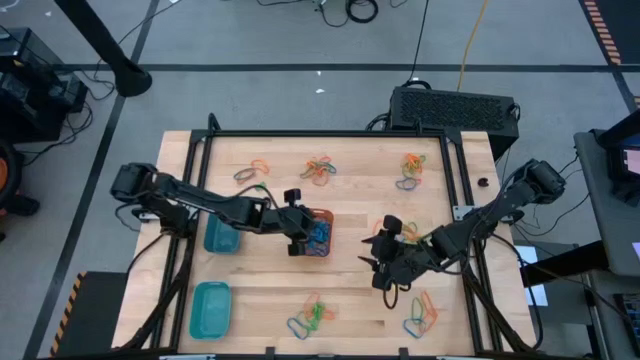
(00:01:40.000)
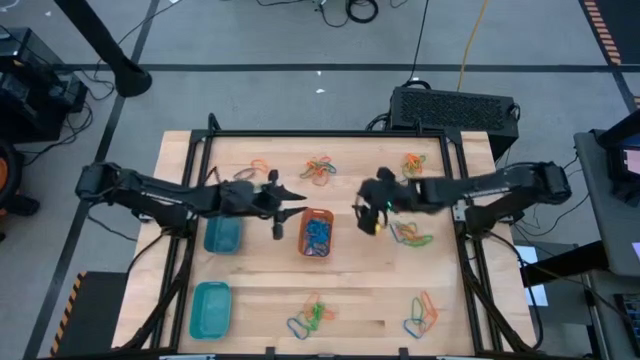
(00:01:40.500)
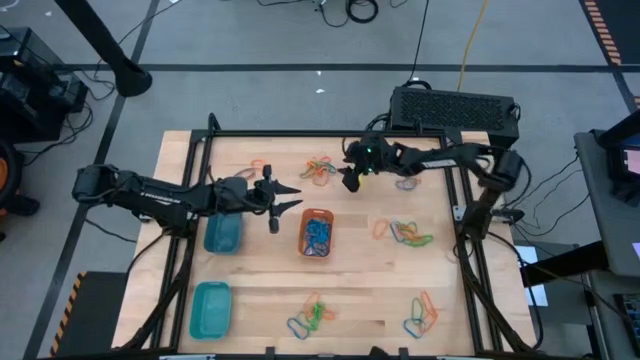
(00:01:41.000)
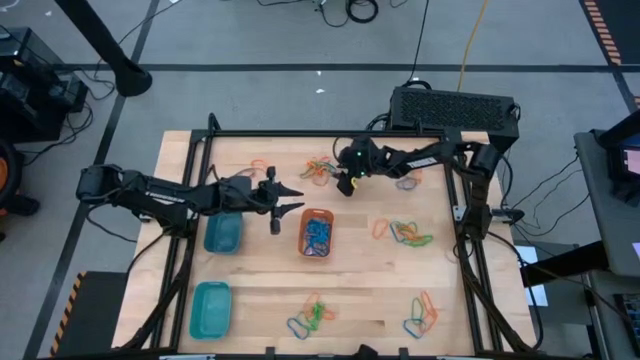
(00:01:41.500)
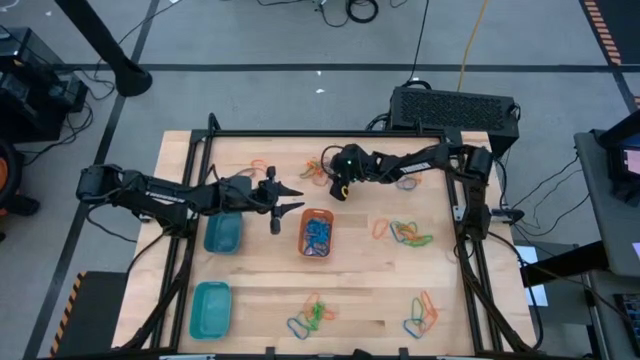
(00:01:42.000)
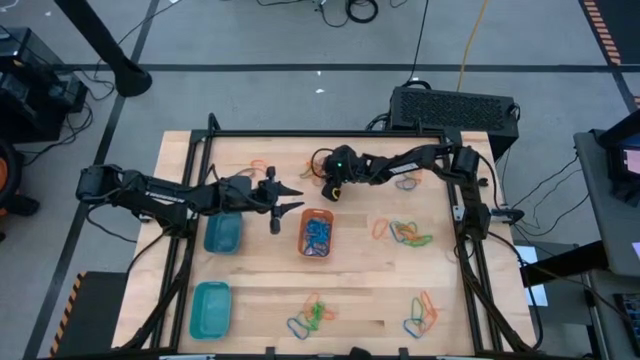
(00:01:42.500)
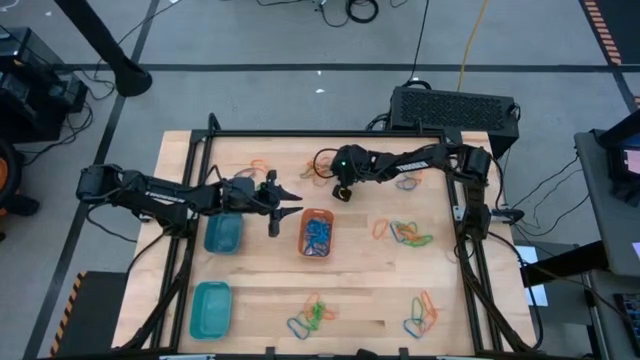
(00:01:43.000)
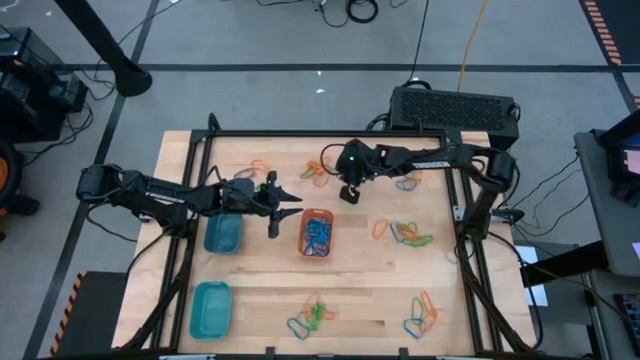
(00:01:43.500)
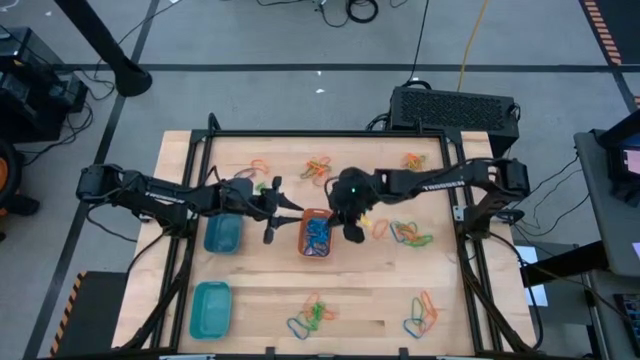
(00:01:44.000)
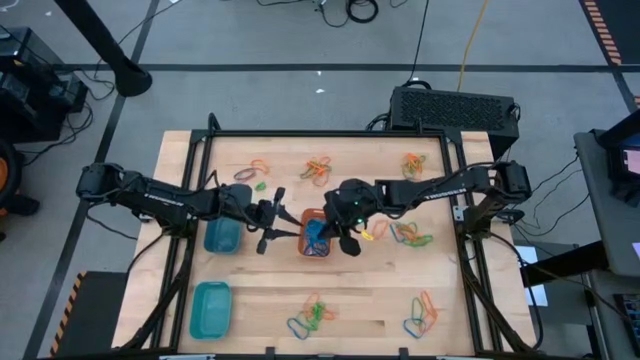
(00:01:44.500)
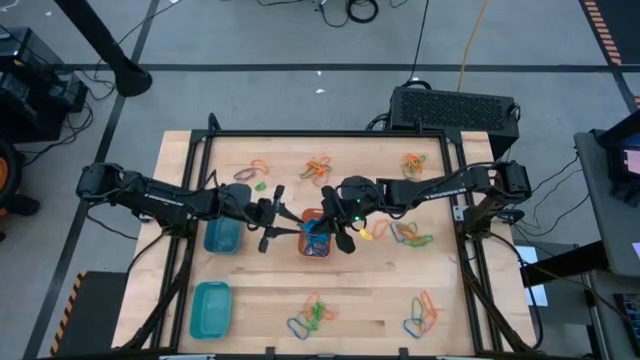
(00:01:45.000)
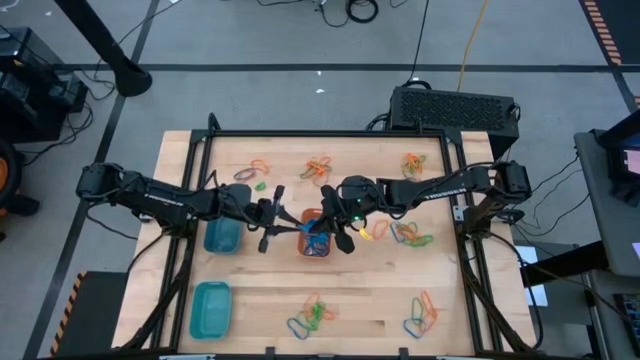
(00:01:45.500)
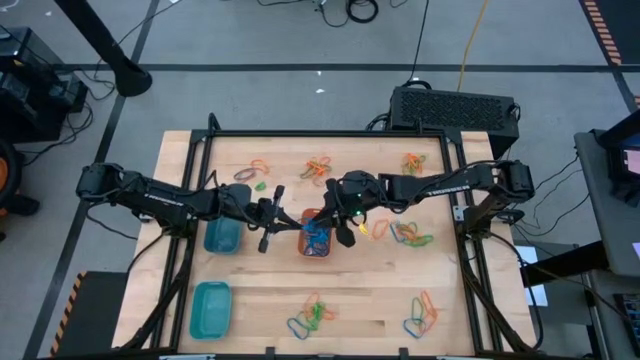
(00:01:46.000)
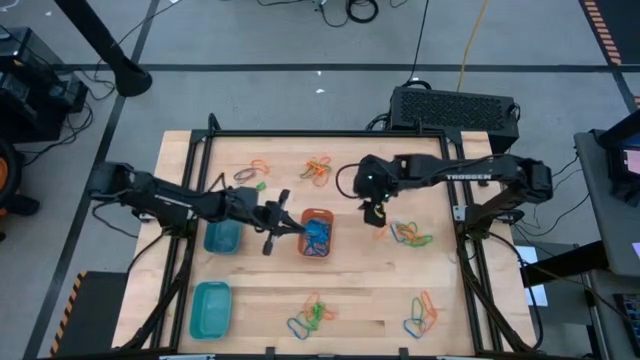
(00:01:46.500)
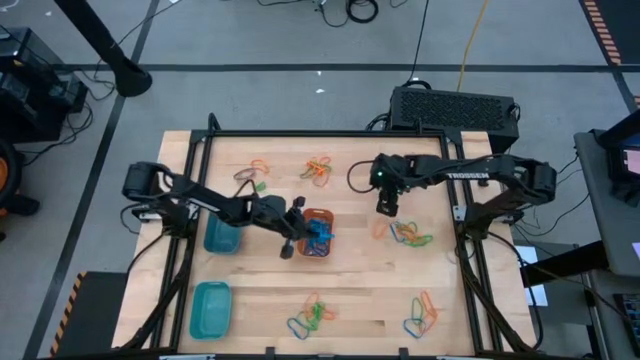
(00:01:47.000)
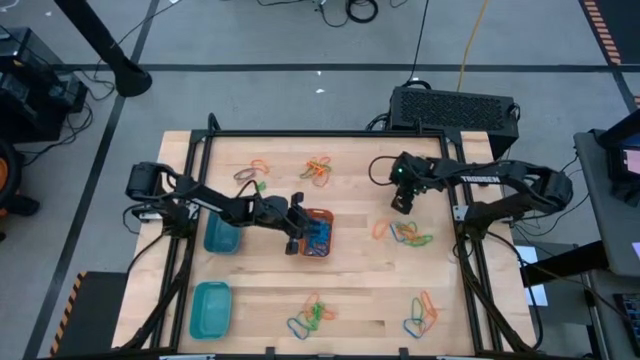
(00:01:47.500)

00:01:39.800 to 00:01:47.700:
Task: Sort rubber bands into baskets
Put the blue rubber band into the orange bin

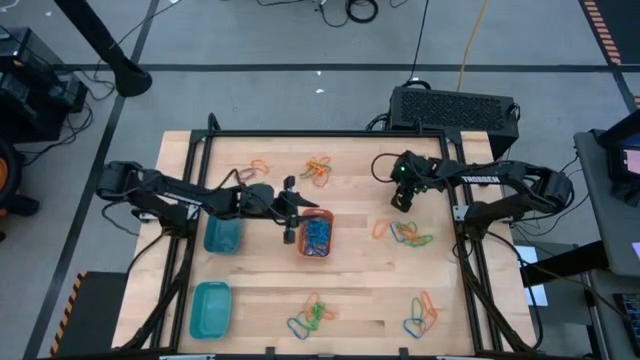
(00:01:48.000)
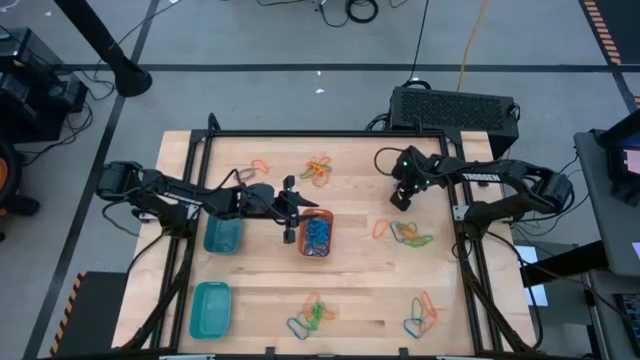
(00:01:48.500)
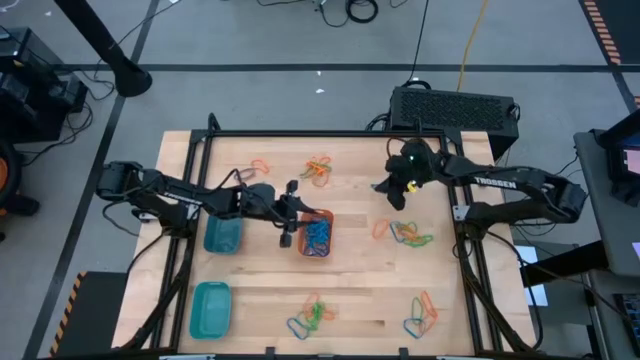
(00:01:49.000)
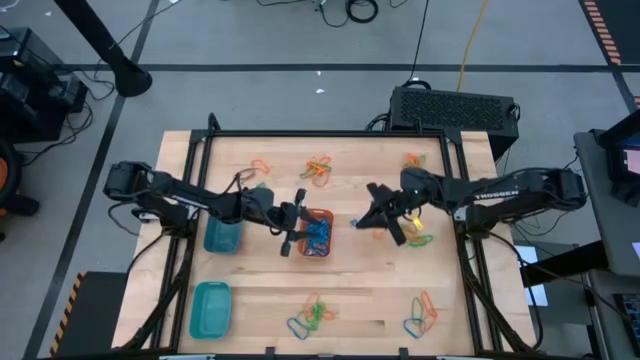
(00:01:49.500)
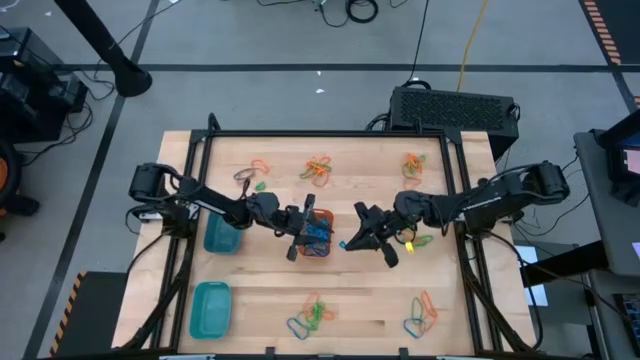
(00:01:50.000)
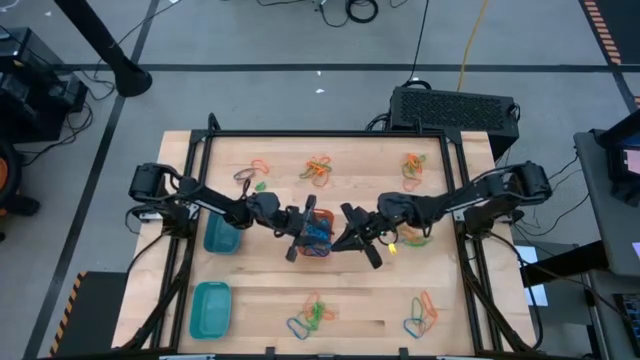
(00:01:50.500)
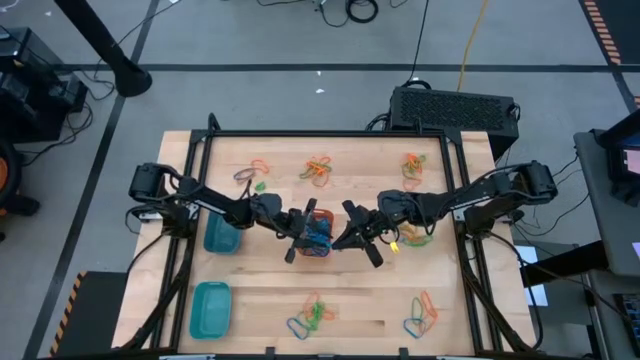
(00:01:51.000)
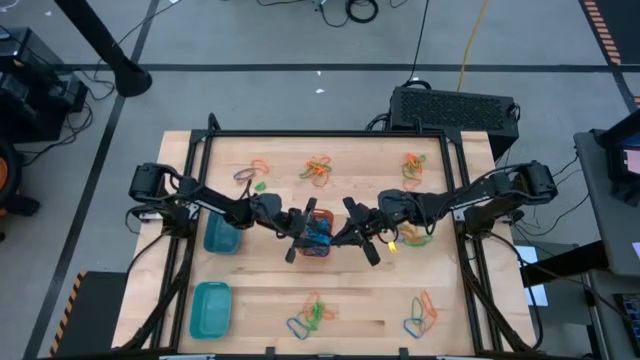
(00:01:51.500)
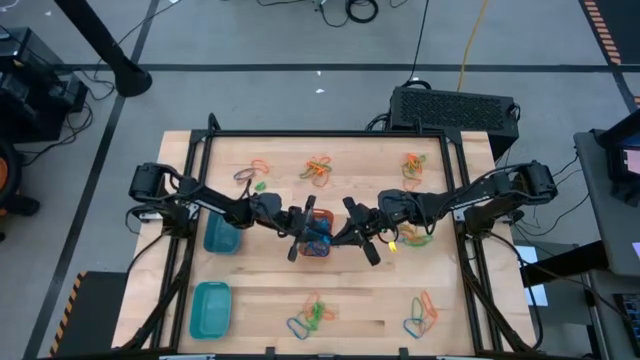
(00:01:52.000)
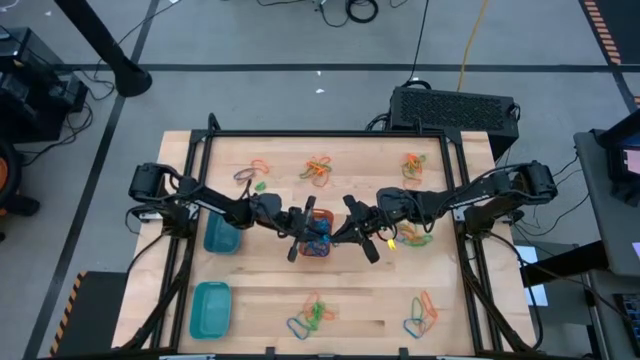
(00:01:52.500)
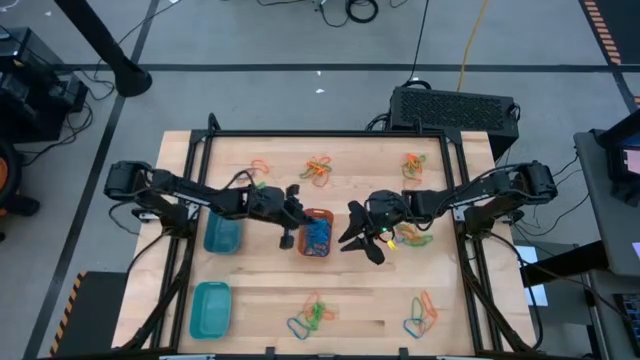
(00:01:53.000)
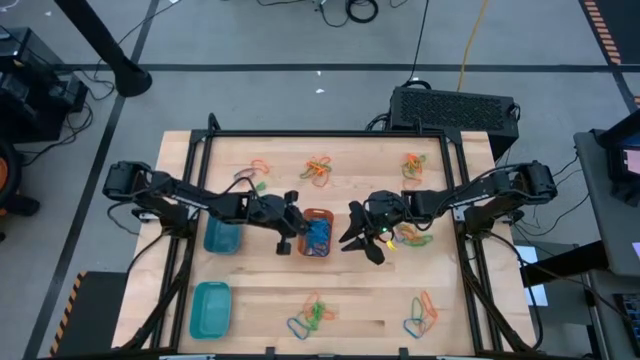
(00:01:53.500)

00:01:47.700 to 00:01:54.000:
Put the blue rubber band into the orange bin

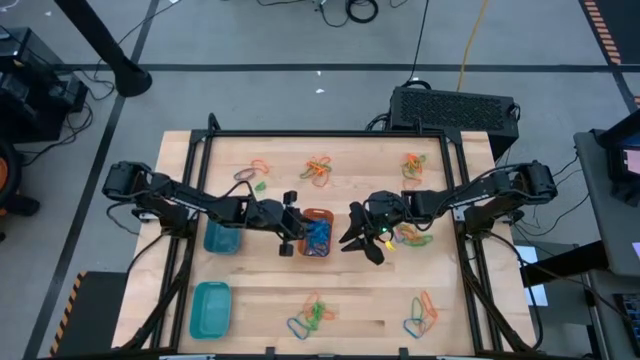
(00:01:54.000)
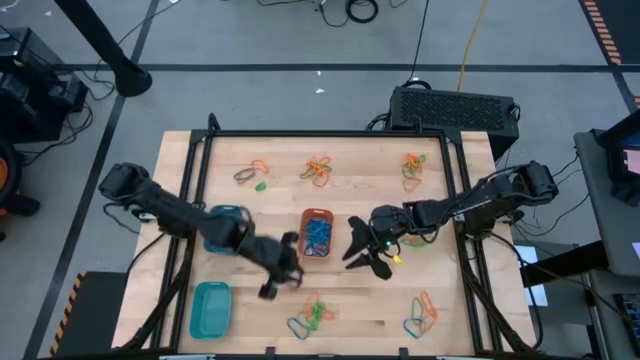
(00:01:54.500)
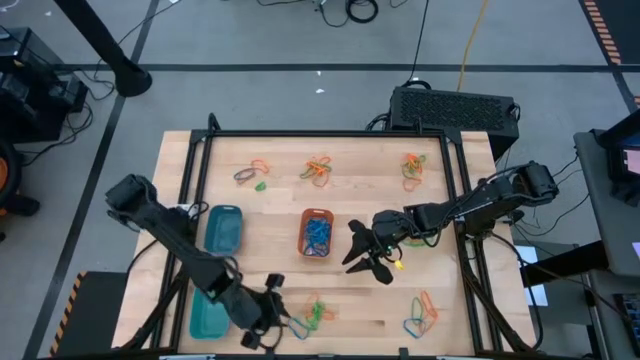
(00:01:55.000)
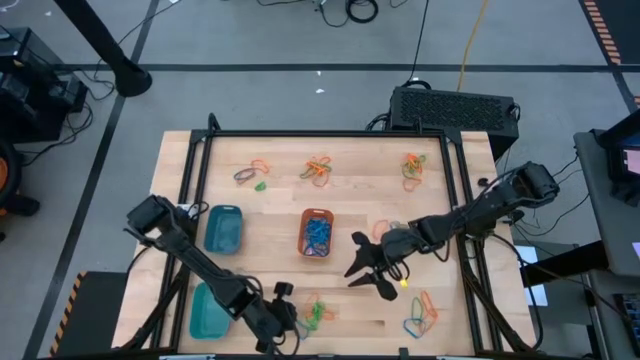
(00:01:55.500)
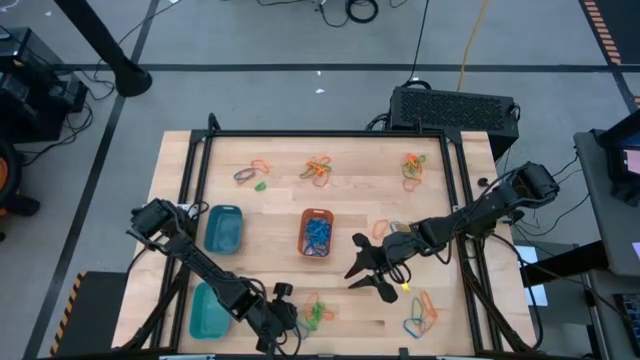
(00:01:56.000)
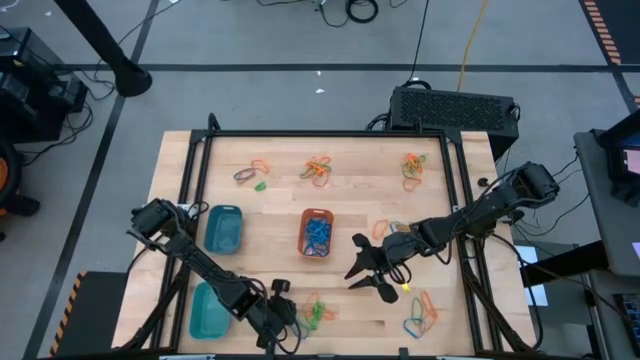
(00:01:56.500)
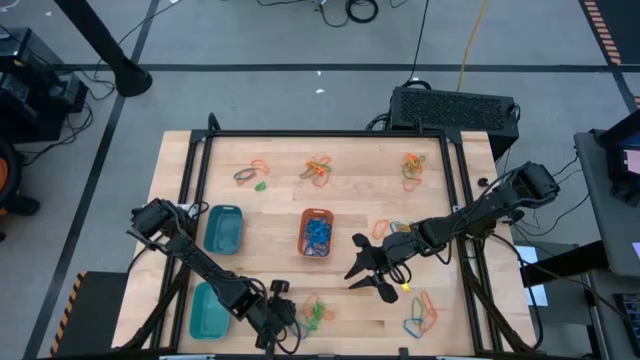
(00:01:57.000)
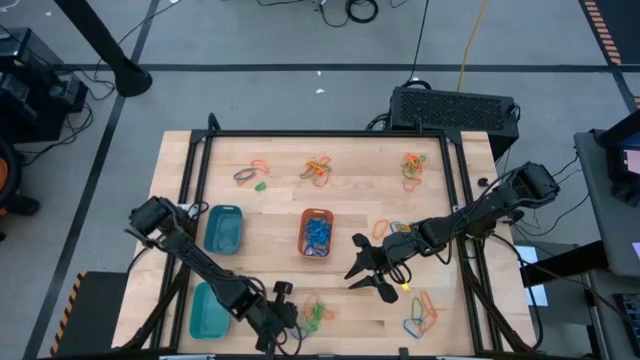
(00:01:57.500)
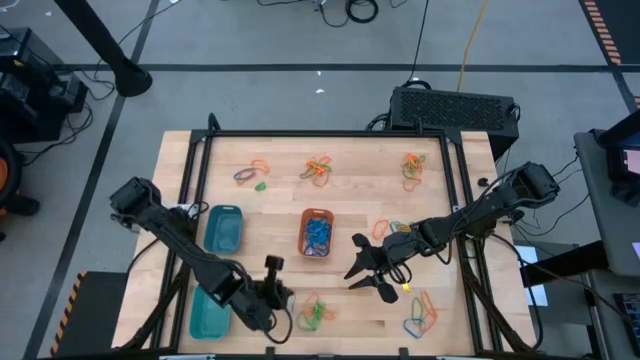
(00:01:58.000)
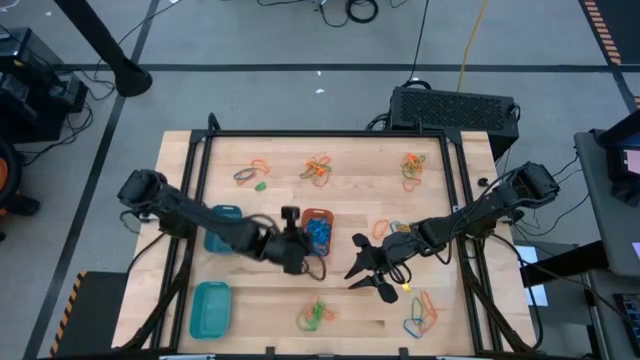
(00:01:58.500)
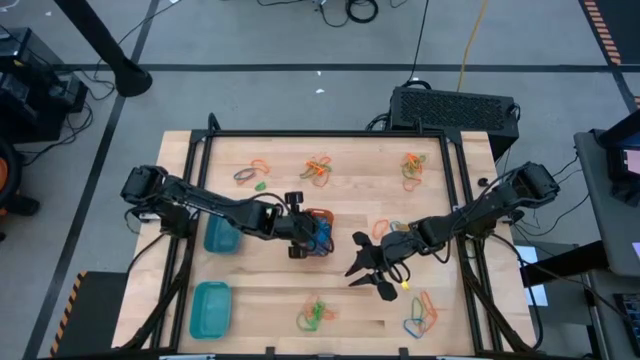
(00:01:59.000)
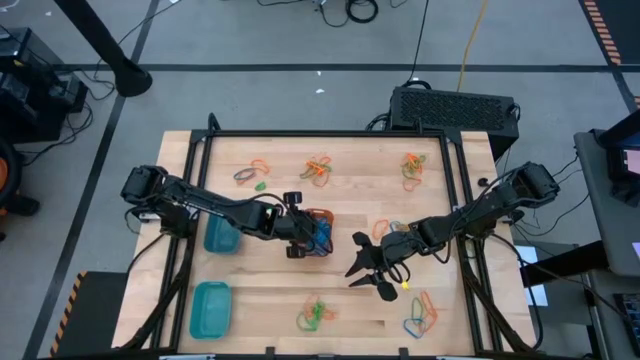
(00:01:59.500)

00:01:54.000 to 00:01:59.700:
Put the blue rubber band into the orange bin
